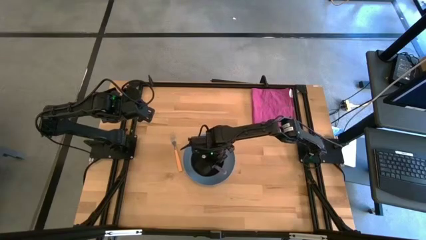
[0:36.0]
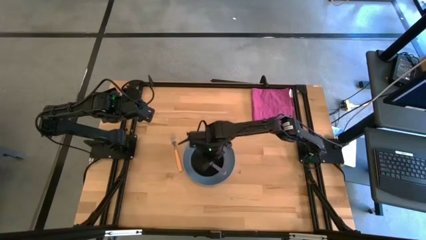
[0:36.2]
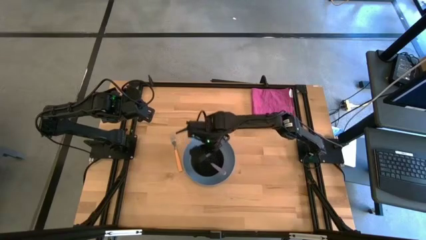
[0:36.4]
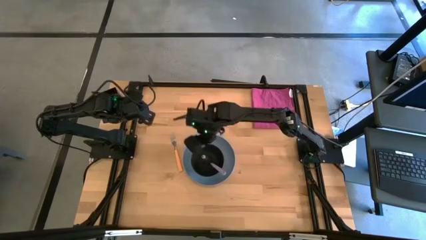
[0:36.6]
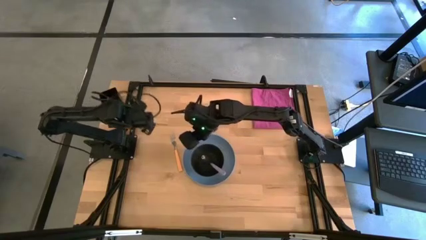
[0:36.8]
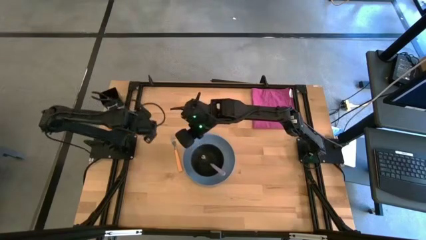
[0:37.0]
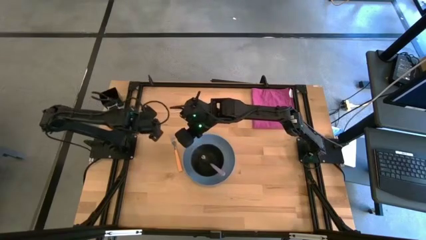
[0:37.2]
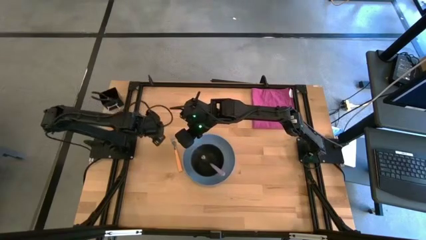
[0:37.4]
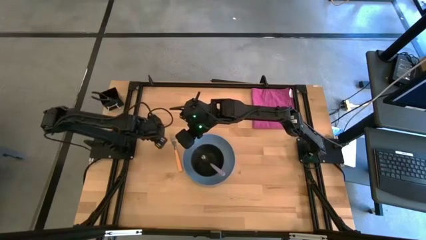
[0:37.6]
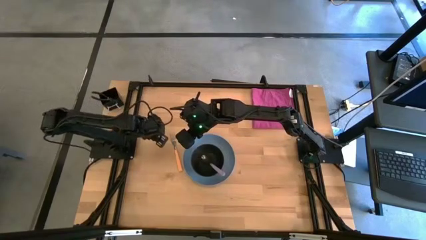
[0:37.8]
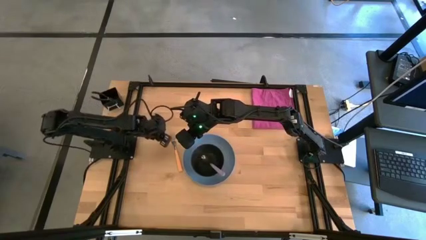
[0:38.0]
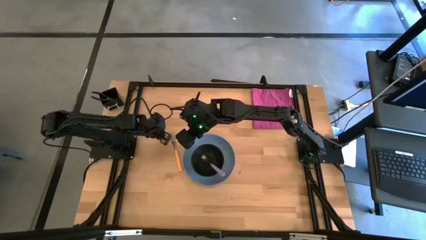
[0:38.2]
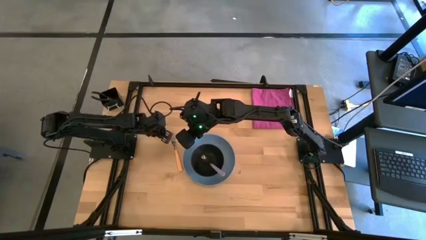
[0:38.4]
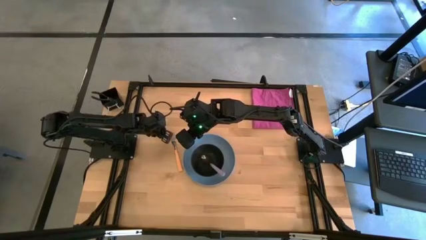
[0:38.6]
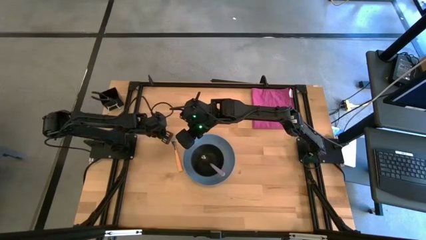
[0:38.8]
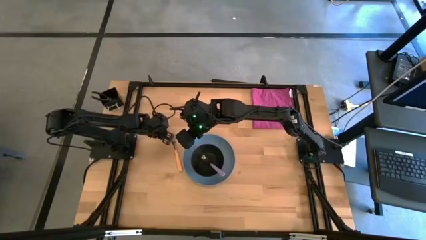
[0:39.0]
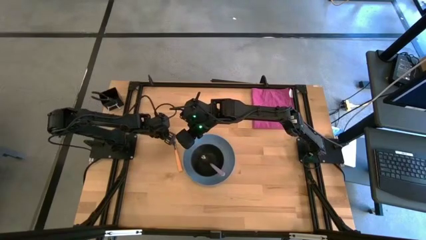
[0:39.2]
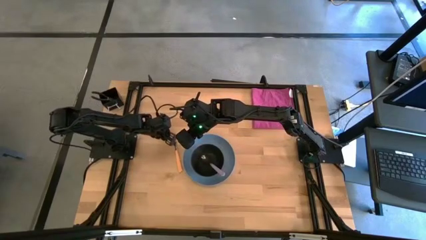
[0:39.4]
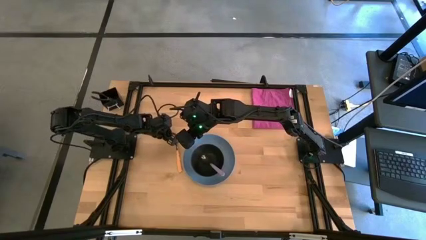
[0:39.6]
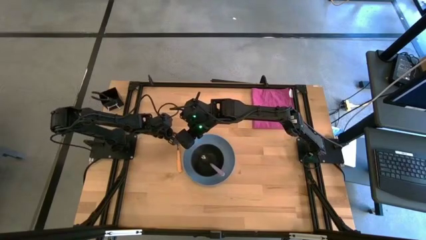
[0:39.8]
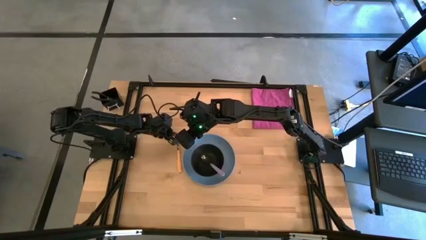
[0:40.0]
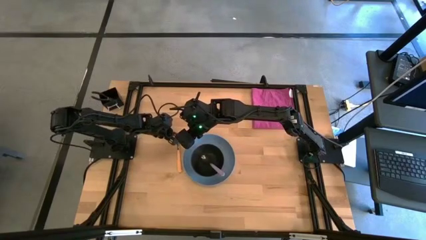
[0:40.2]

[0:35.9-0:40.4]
Task: Set table place
Adjust the orange fork

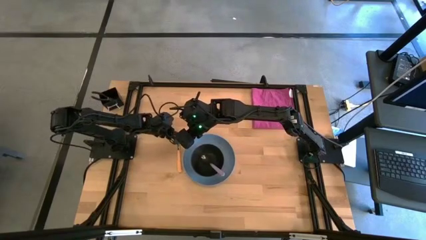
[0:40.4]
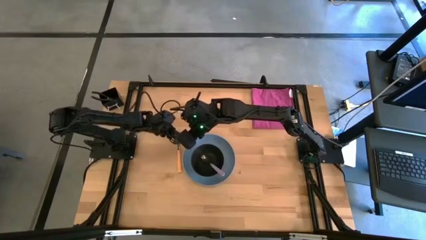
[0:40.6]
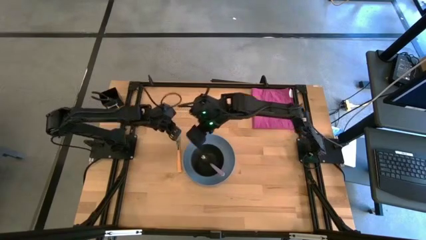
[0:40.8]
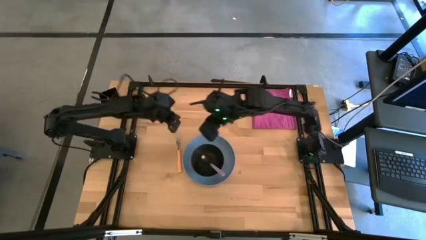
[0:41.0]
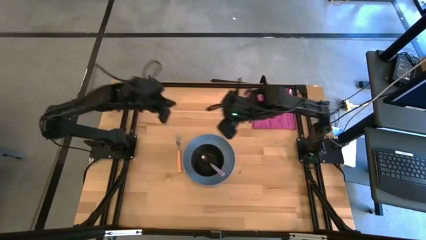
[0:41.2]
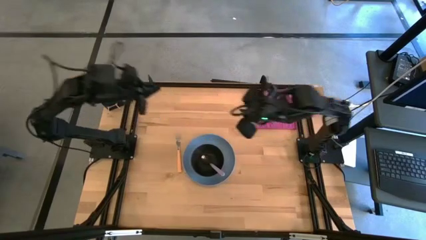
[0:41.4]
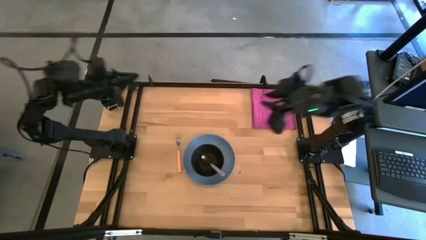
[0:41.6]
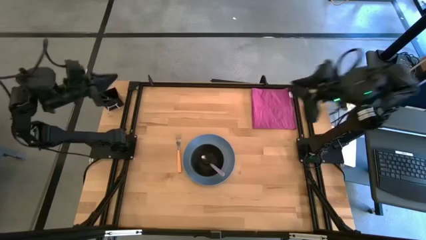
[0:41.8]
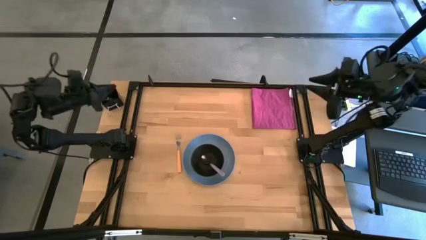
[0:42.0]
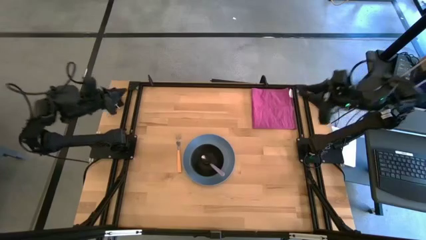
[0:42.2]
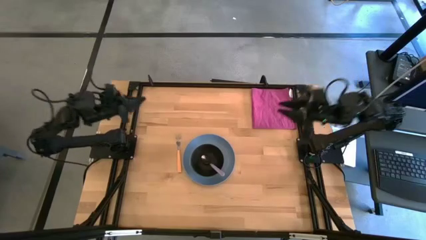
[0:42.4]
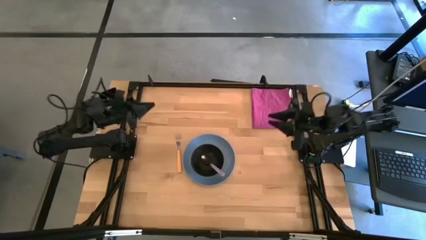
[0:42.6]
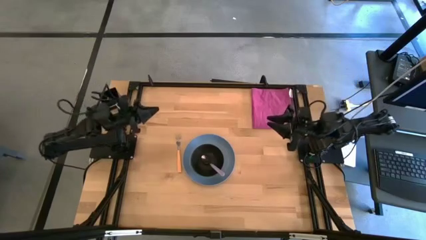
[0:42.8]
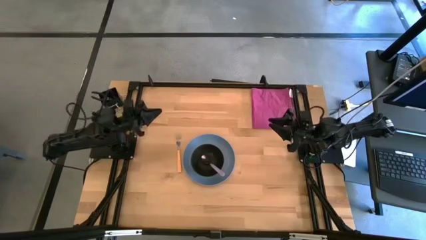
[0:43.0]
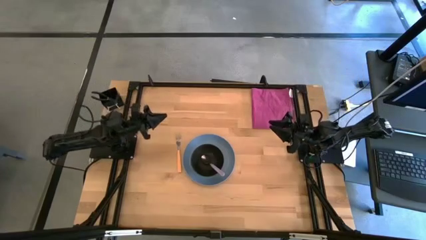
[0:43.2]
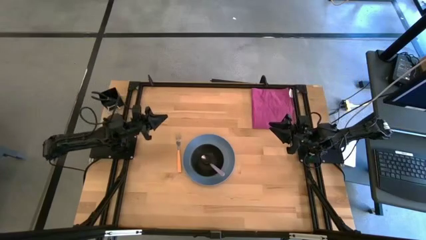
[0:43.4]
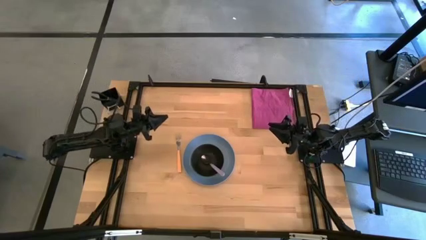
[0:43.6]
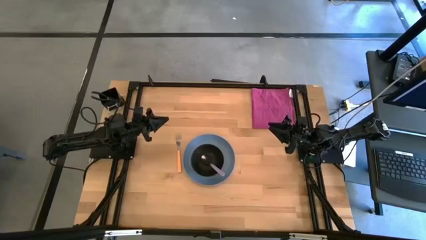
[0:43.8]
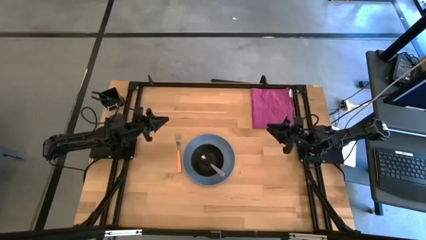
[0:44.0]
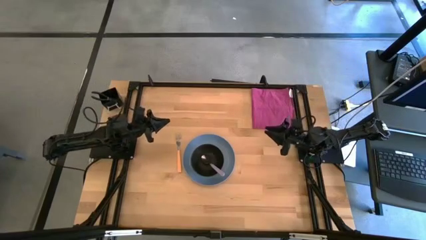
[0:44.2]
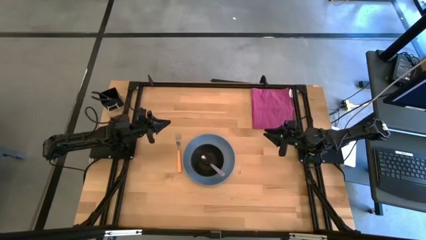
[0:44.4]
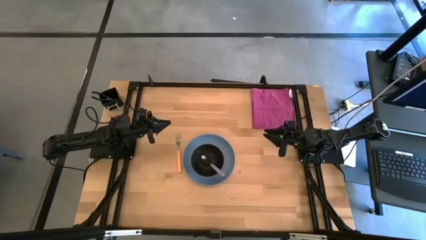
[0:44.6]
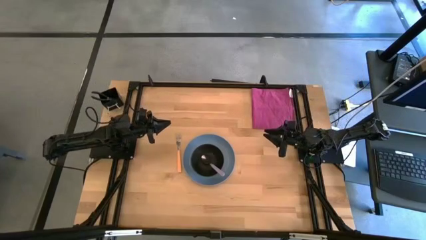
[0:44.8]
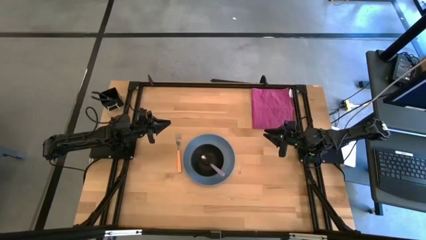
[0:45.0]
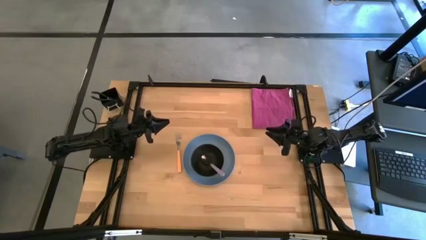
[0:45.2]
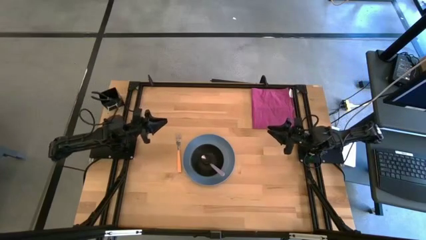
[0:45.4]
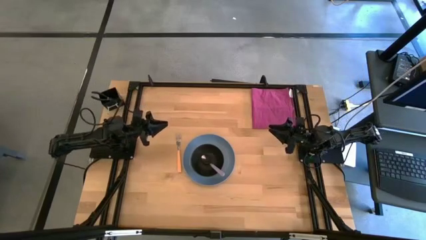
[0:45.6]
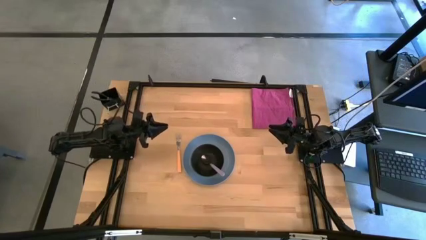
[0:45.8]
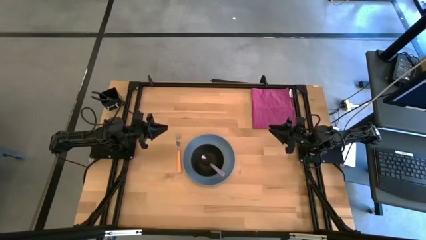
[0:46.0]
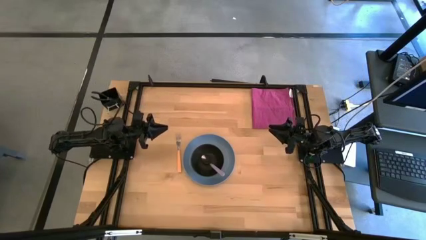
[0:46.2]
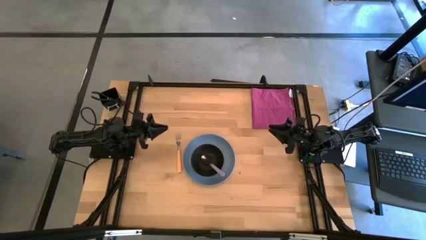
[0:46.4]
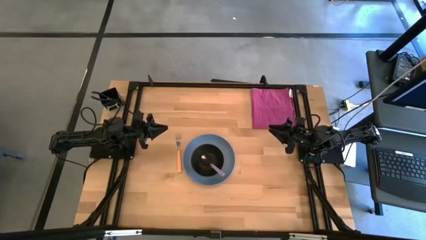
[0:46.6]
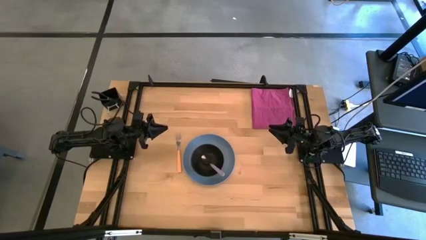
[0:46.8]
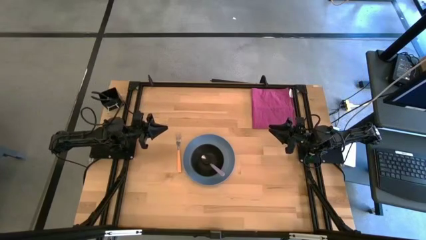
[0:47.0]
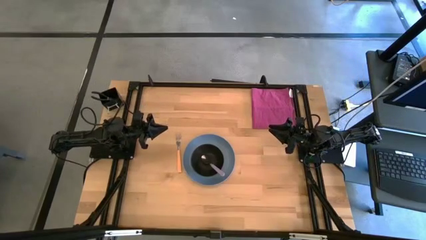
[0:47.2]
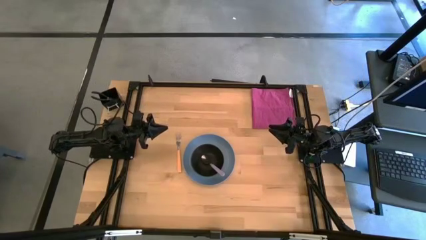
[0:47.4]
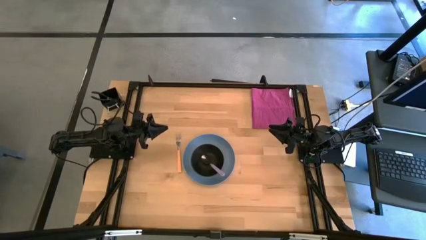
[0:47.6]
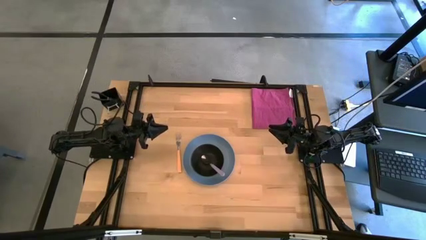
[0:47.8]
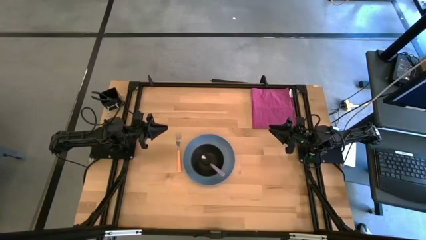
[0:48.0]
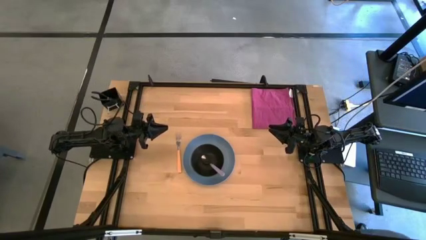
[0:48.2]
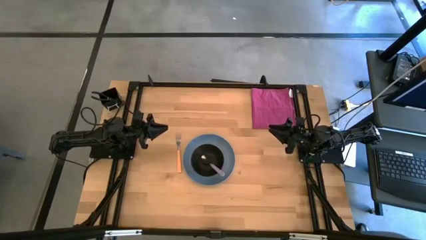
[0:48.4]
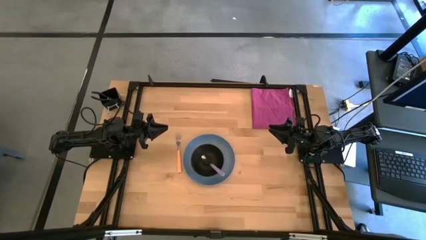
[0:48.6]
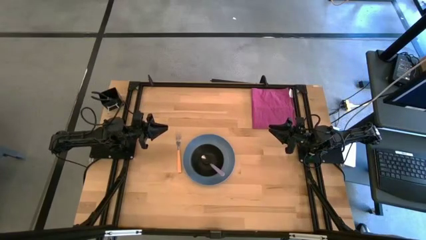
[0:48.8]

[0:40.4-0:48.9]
Return to Home Position

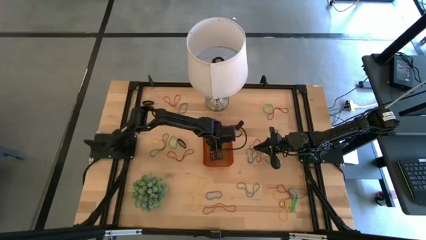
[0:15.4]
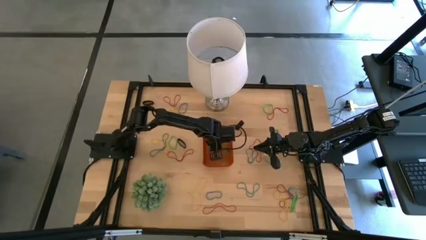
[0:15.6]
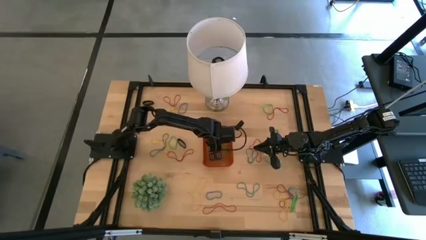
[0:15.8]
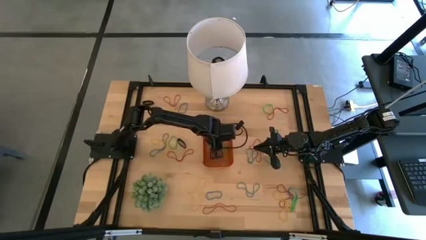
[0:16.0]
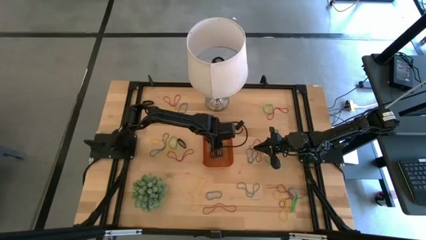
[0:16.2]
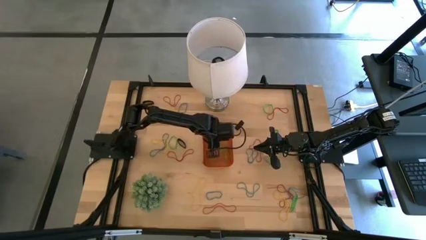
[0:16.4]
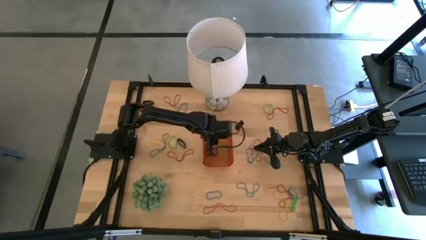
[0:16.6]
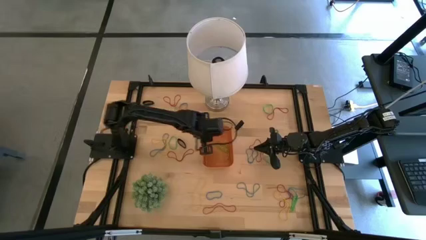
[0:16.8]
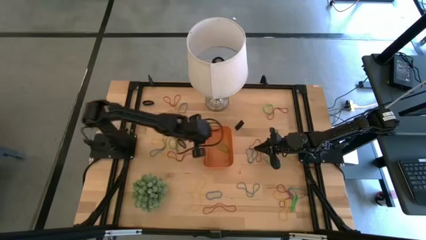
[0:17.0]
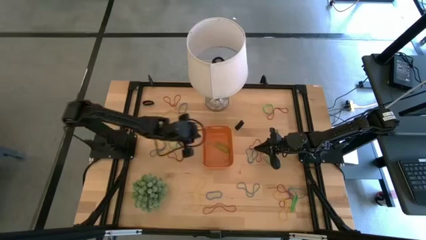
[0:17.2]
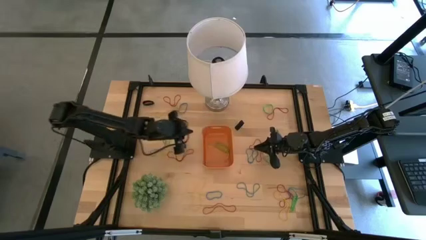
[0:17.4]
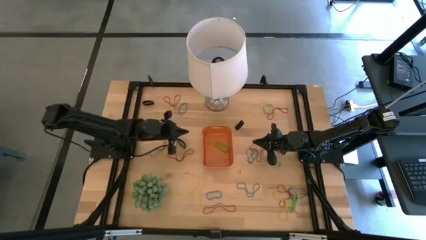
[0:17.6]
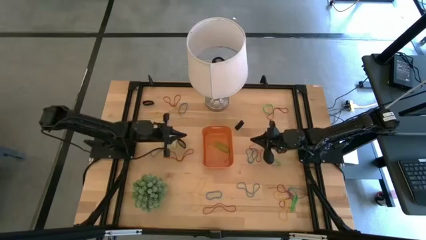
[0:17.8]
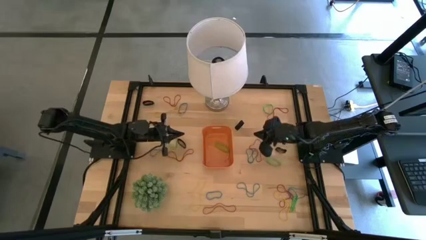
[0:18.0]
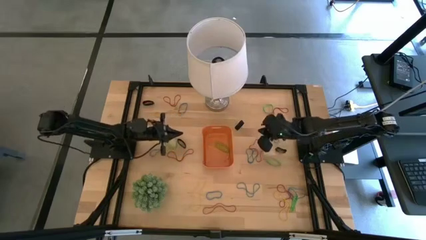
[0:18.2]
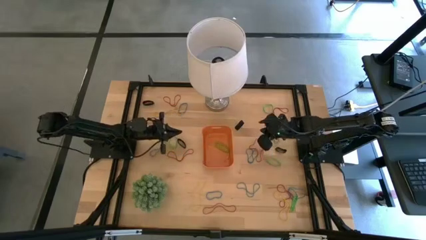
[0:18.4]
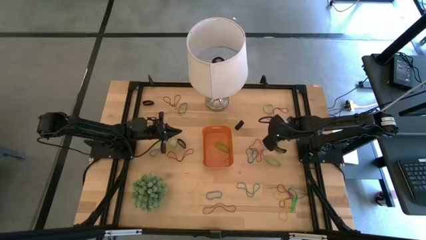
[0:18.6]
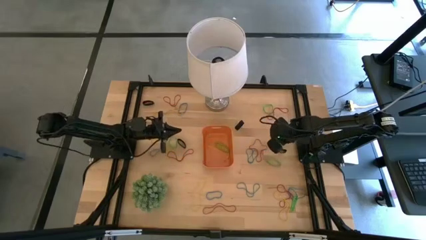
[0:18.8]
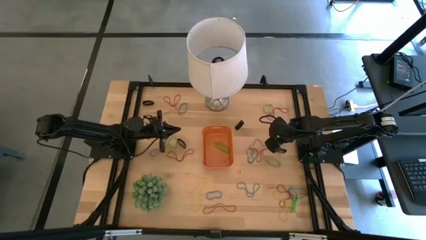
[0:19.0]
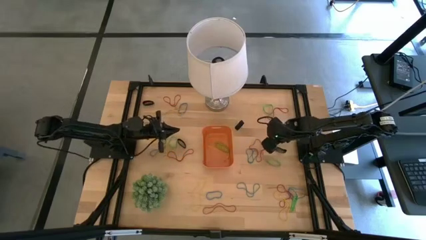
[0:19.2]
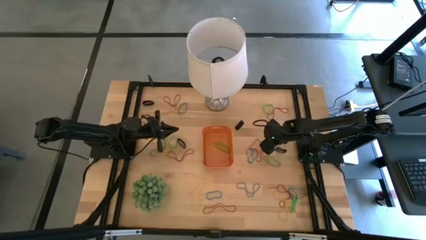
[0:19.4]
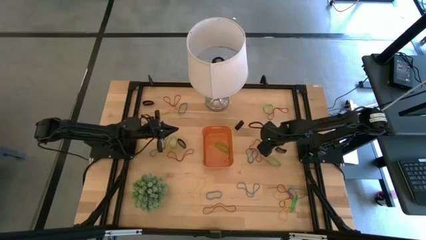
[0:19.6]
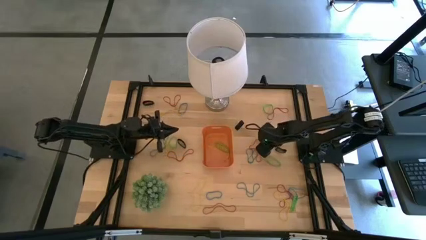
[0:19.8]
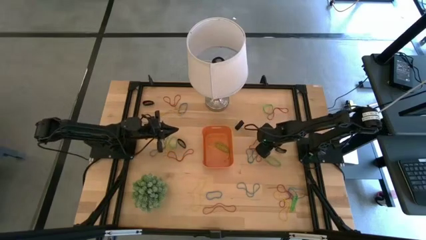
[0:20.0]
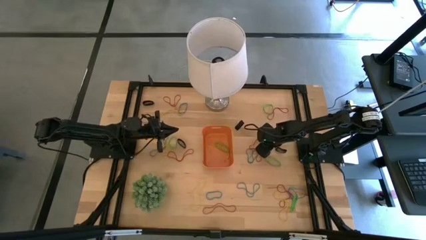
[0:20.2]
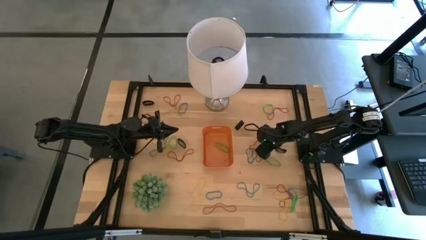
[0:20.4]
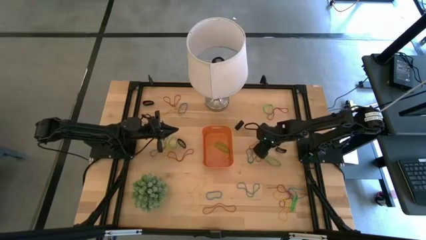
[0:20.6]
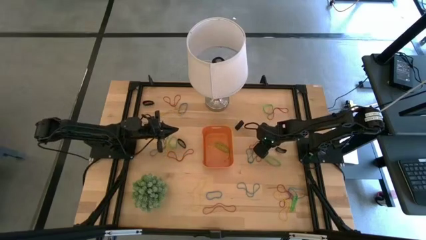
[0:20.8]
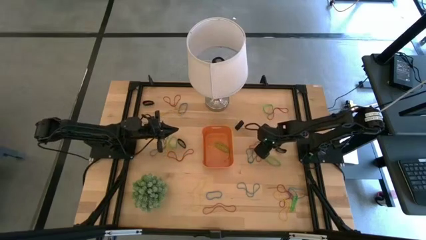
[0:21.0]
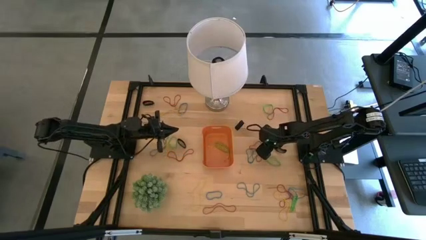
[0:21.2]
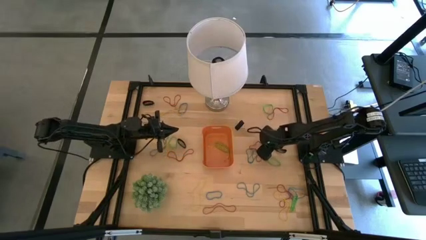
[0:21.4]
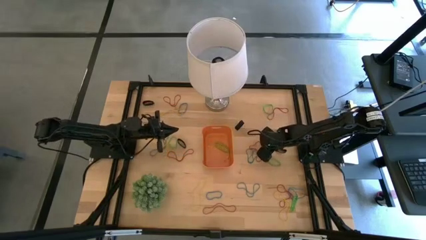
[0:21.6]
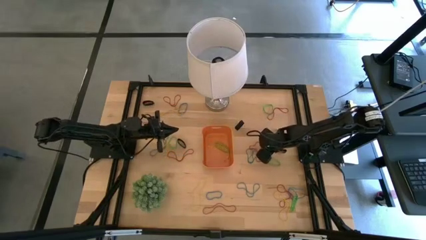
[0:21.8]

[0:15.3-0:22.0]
Task: Pick and place rubber bands into bin
Put the red rubber band into the orange bin
